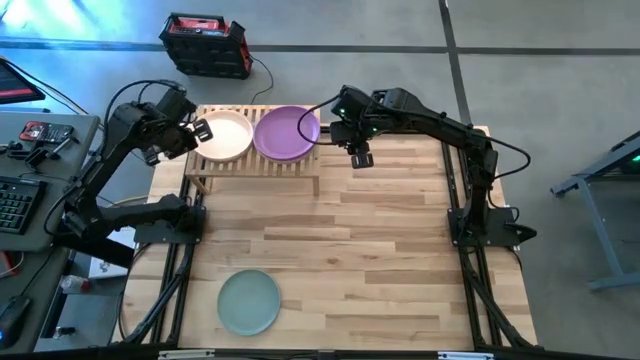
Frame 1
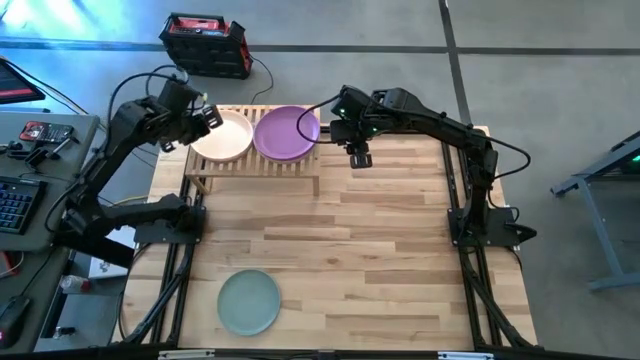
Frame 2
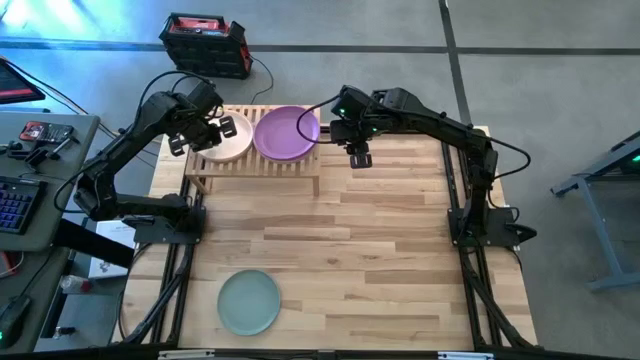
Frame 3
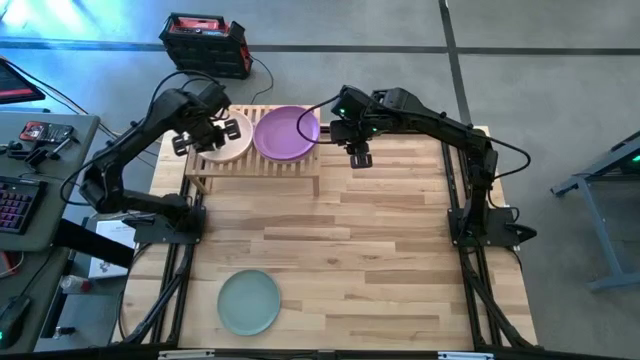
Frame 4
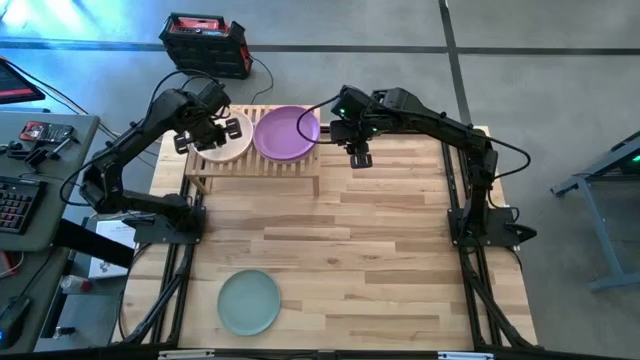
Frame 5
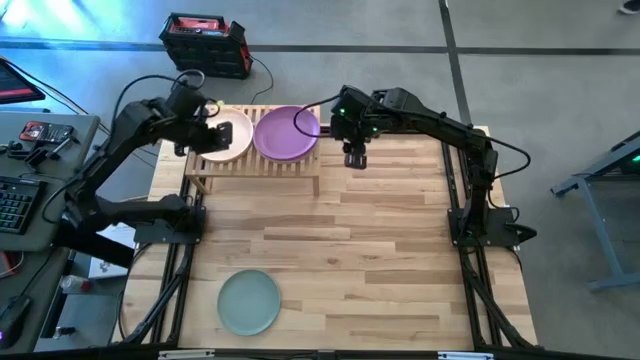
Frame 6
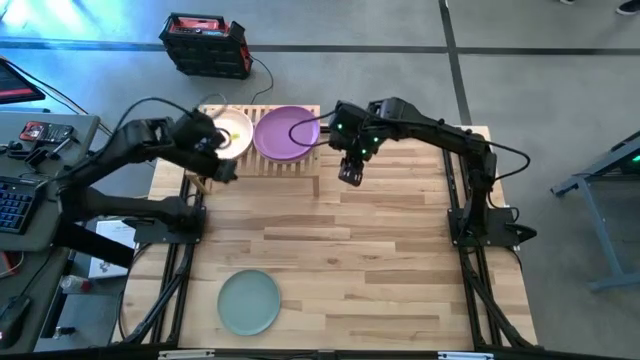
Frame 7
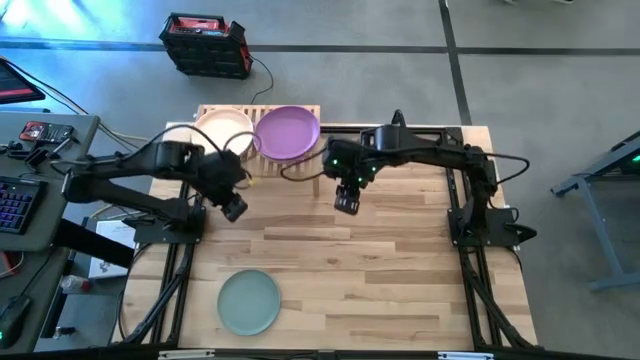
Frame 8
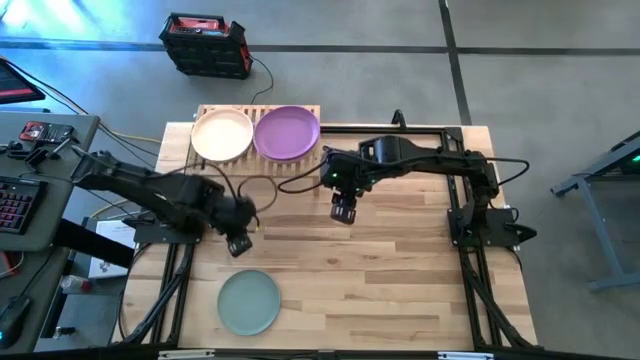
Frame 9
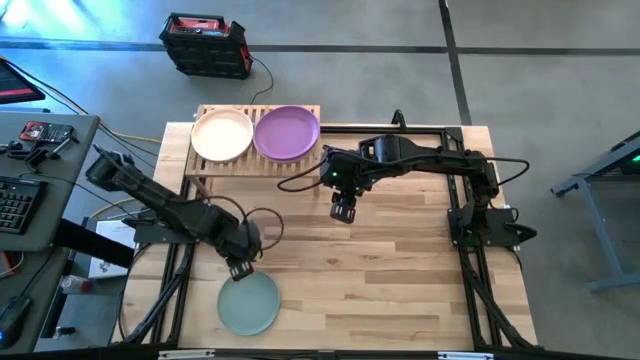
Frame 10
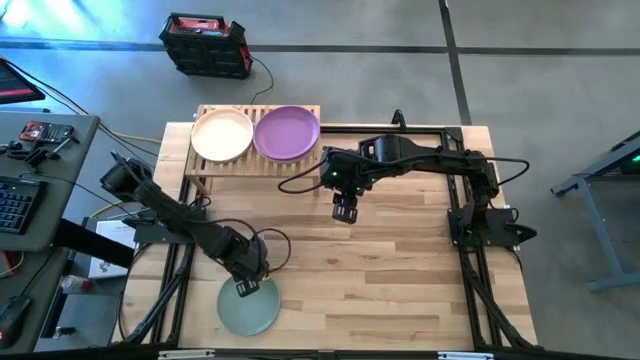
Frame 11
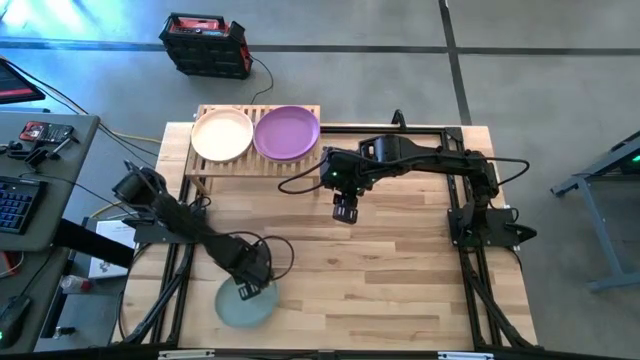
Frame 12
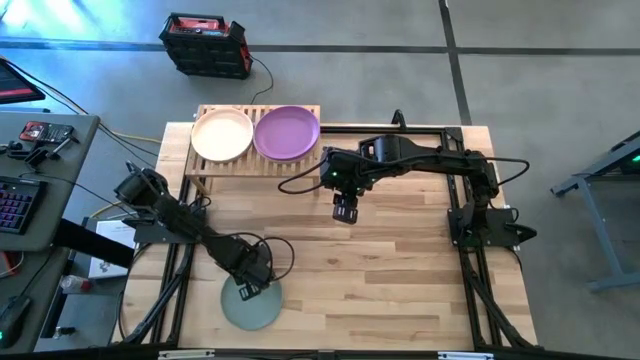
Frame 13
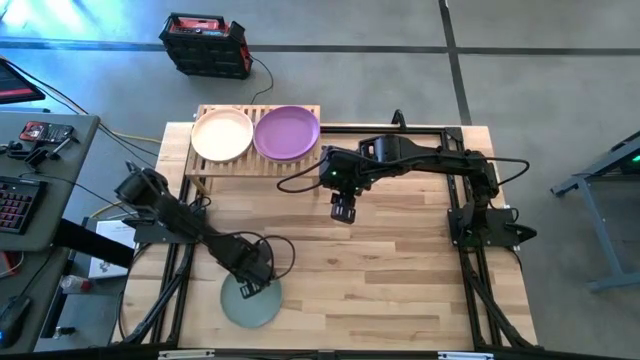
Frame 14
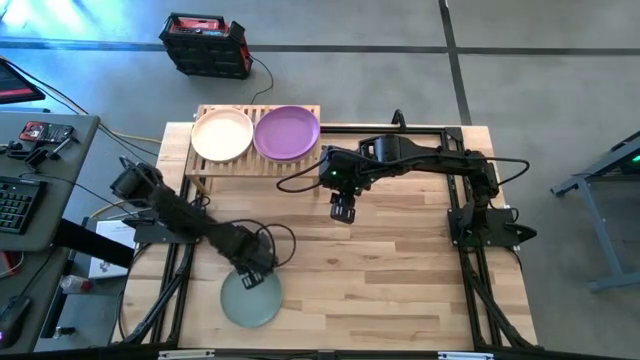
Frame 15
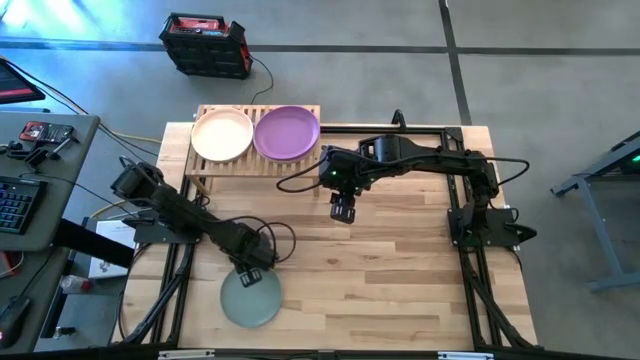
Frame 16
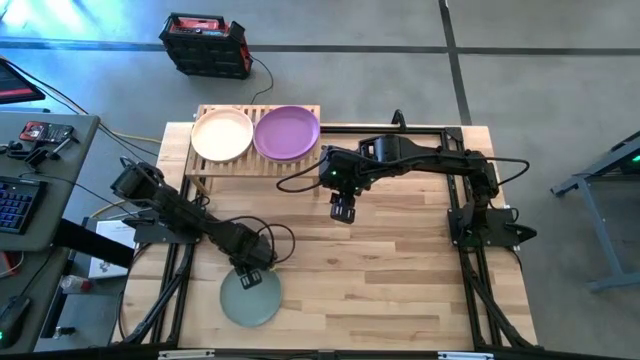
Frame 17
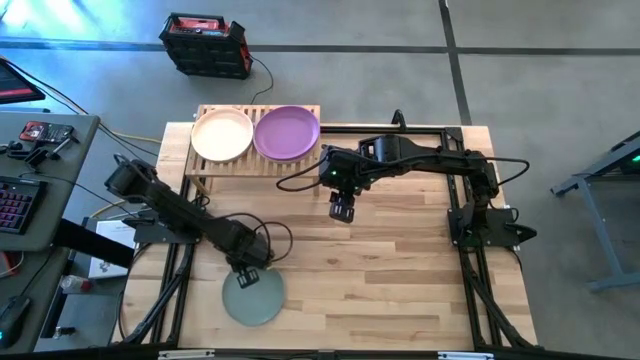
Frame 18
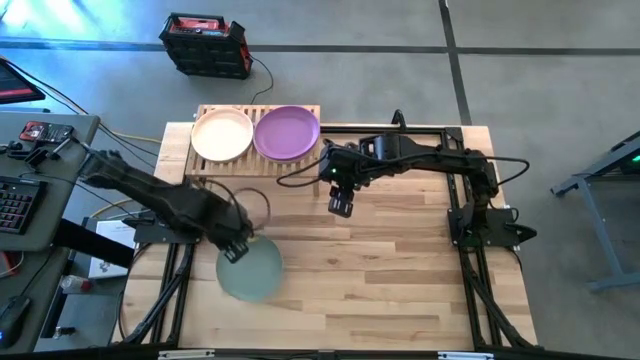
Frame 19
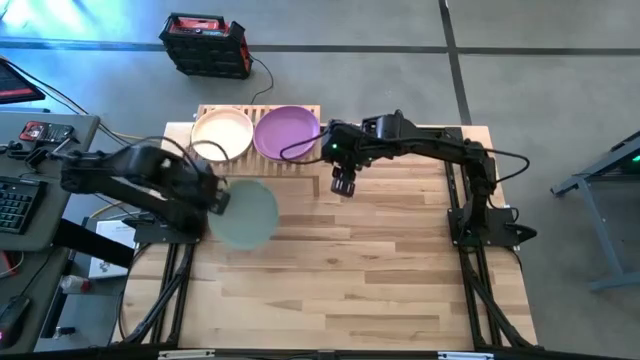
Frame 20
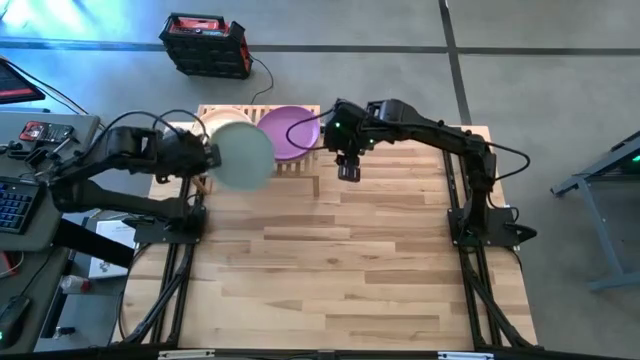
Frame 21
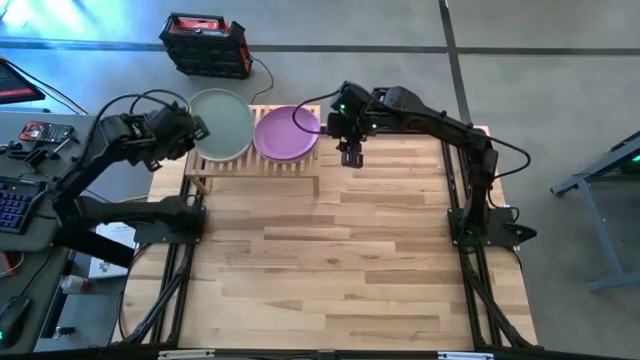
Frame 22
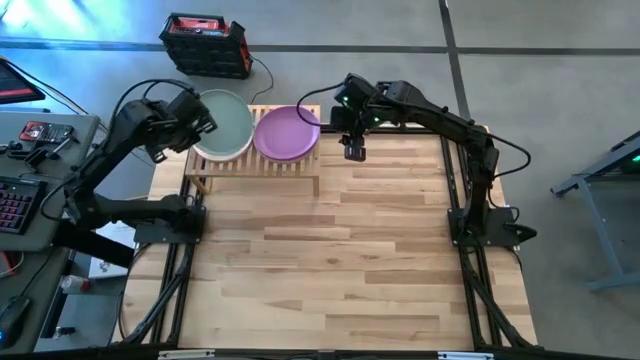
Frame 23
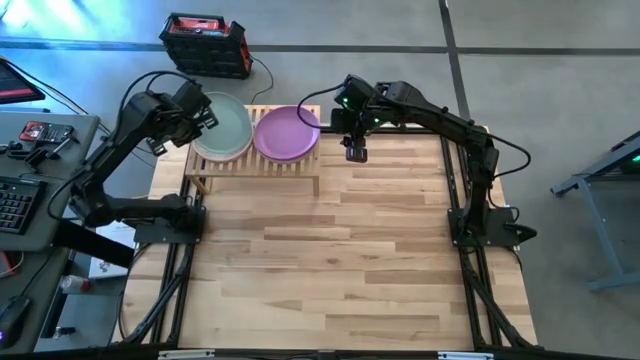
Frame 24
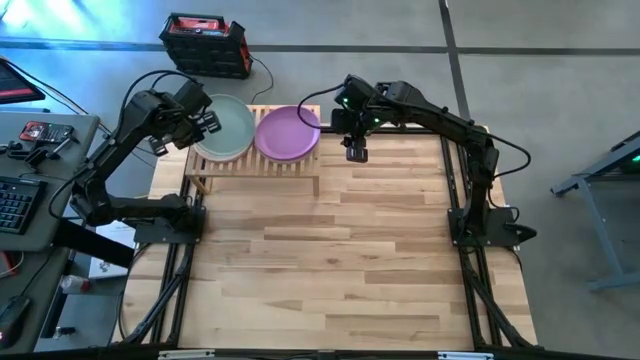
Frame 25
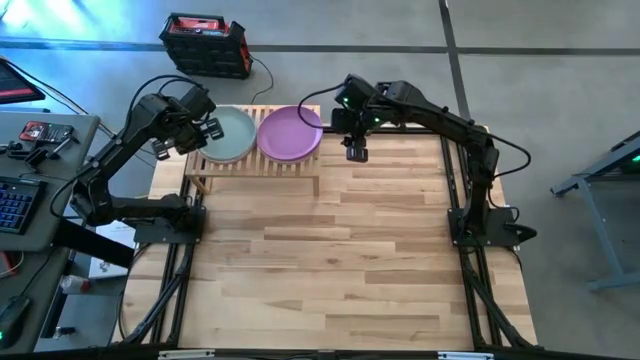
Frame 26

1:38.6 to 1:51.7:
Task: Place and stack plates onto a shelf
Stack the green plate on top of the light brown plate on the shelf

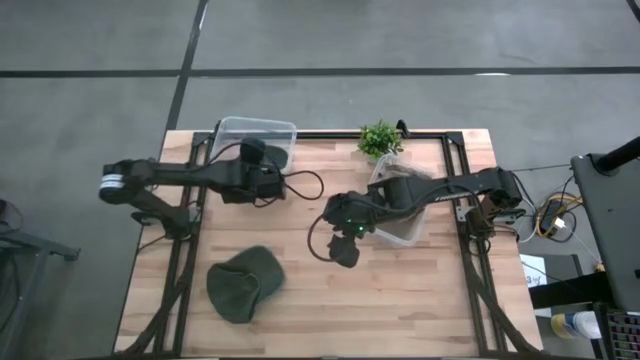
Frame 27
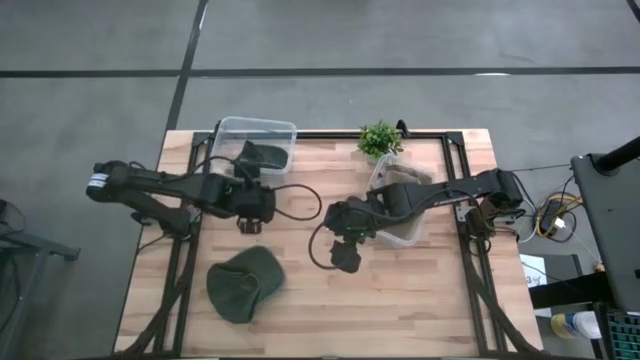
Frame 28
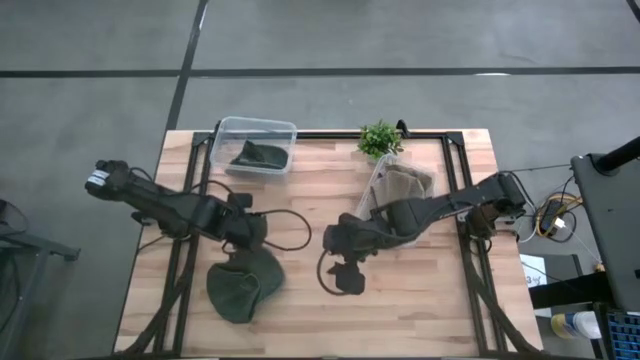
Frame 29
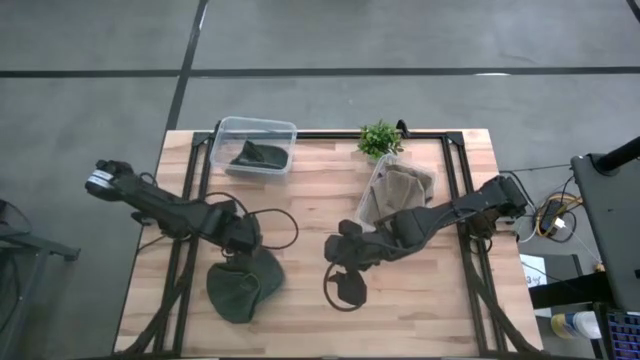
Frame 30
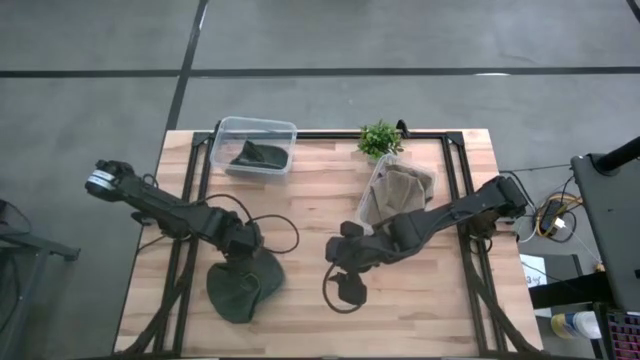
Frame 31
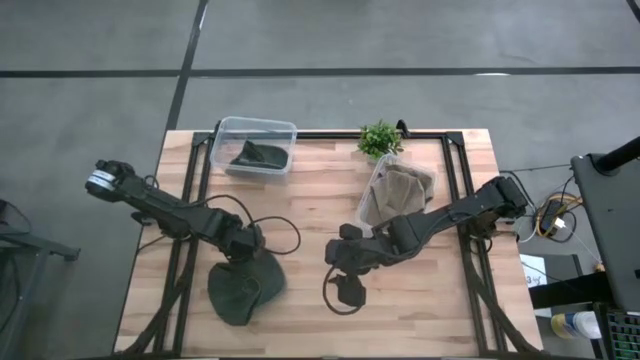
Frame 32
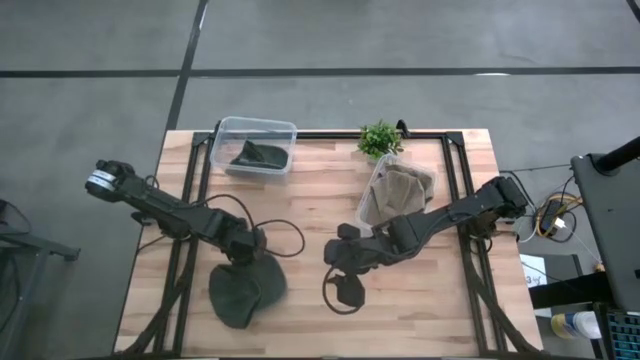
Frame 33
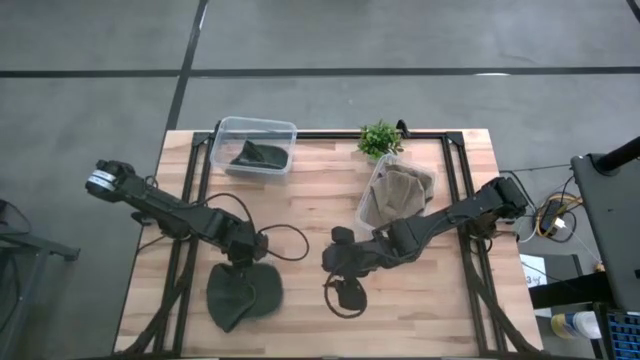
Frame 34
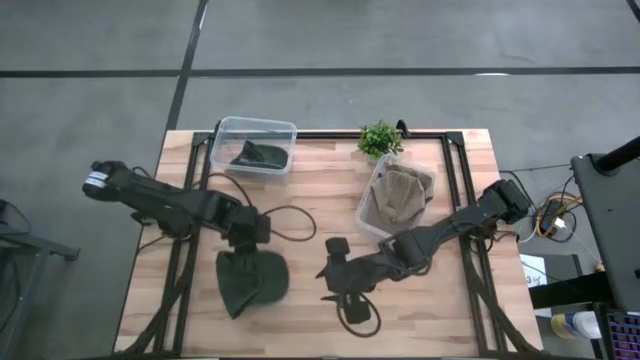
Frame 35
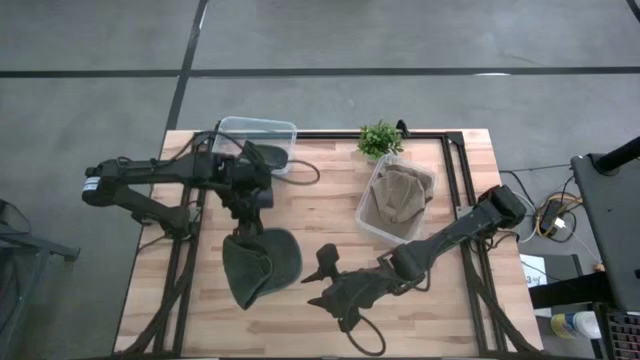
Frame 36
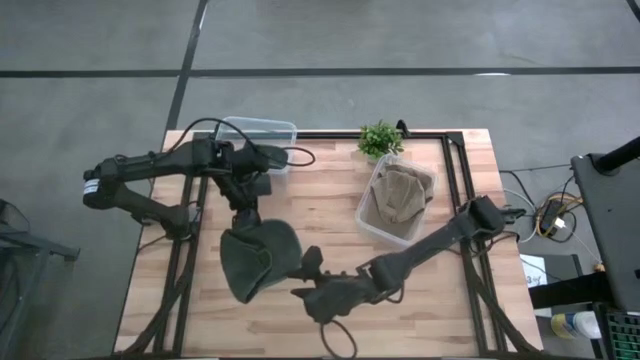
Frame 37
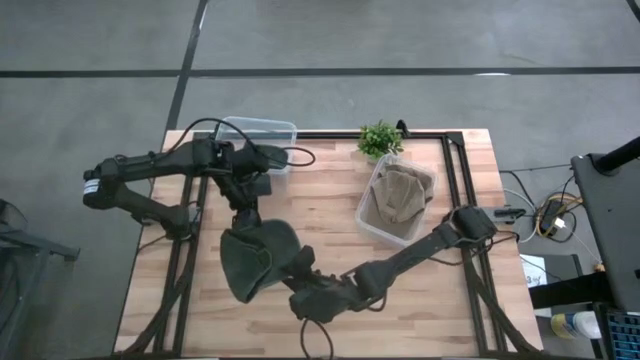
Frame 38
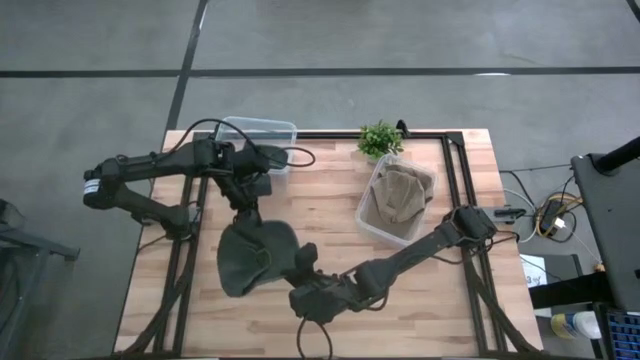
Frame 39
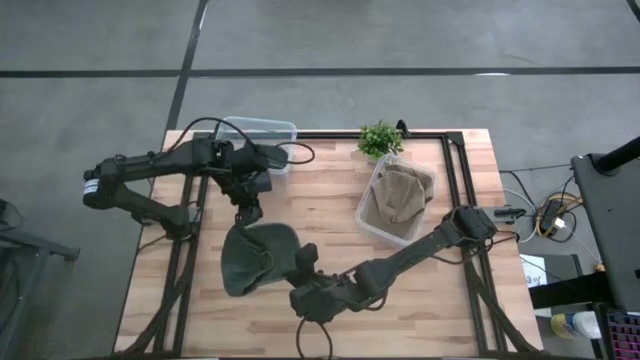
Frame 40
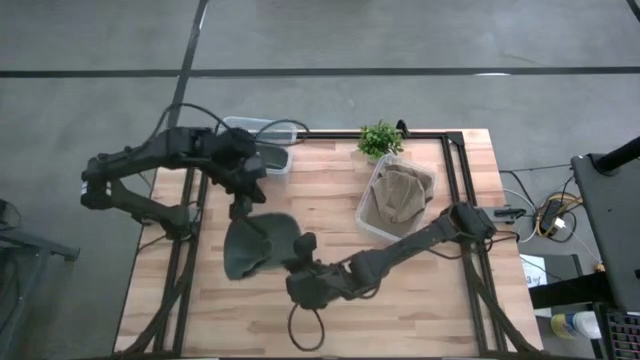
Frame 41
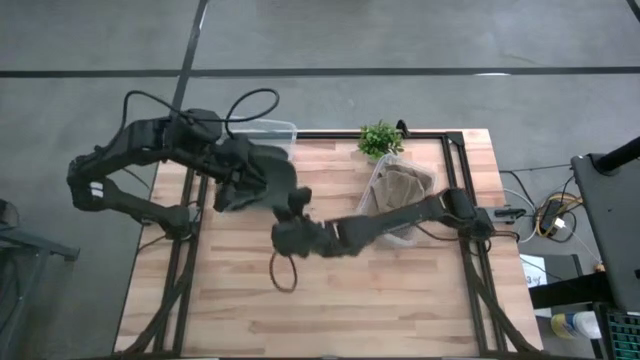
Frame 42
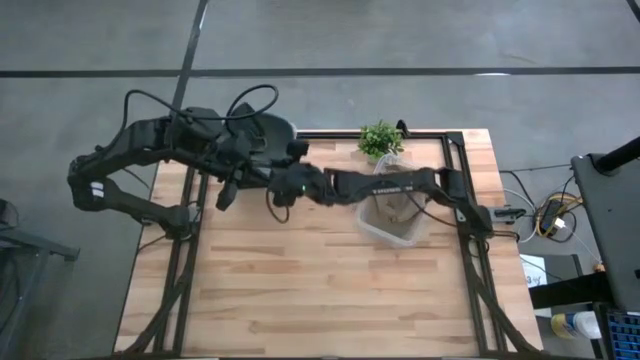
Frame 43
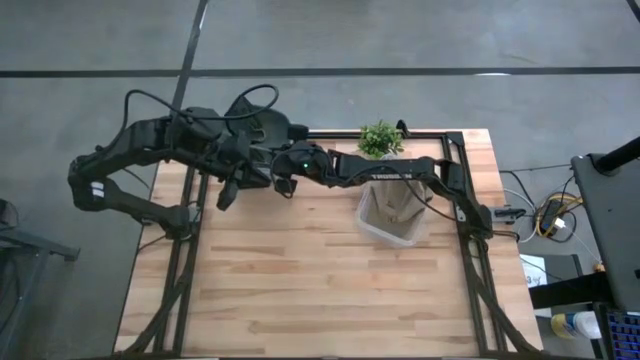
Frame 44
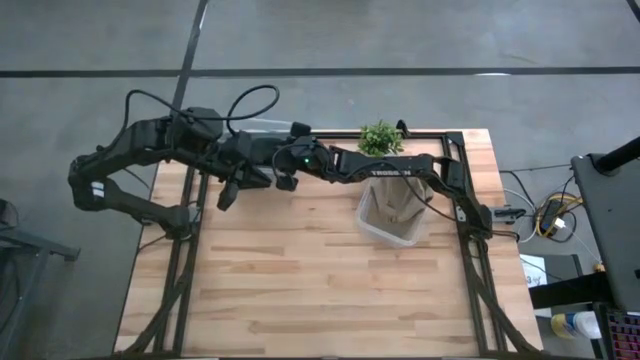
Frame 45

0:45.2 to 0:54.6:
Task: Pick & Place hat
Put the blue cap into the left transparent bin
